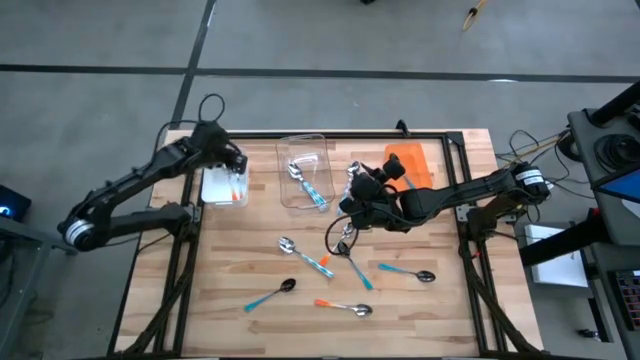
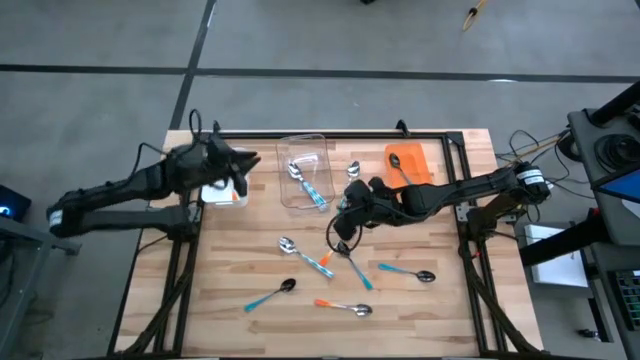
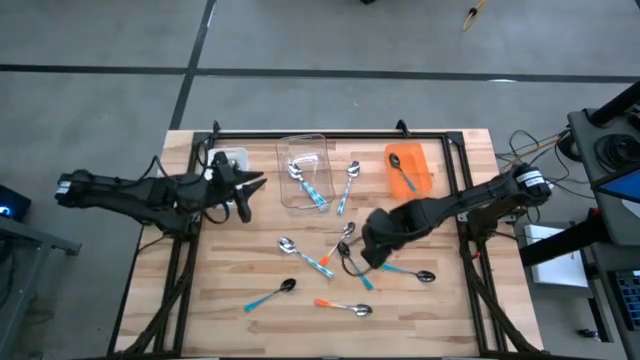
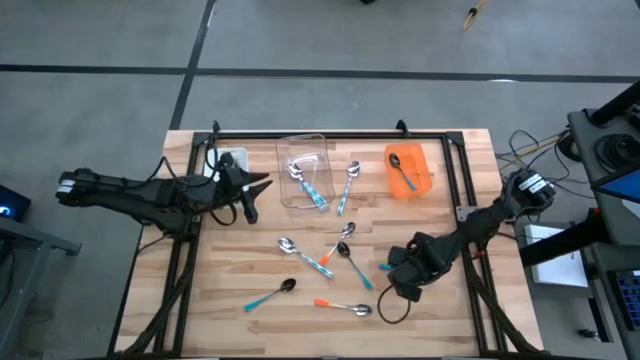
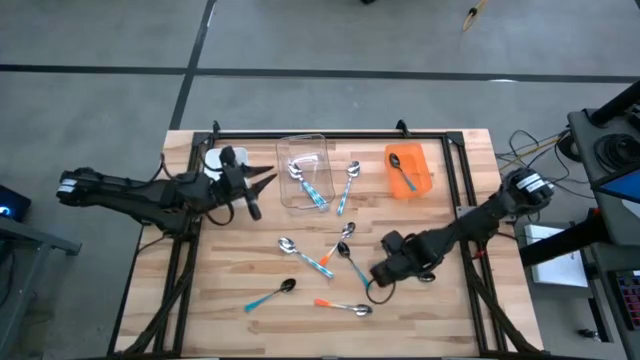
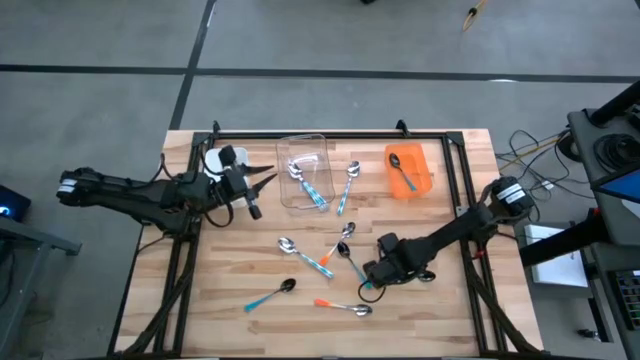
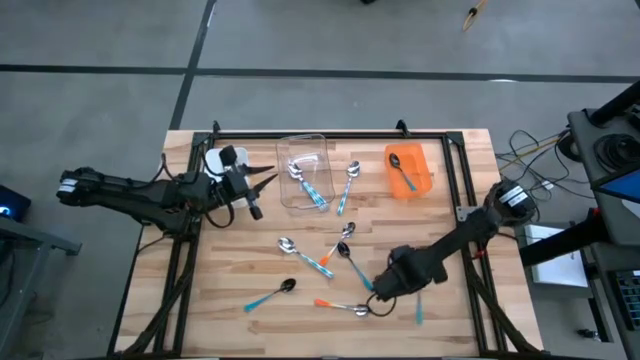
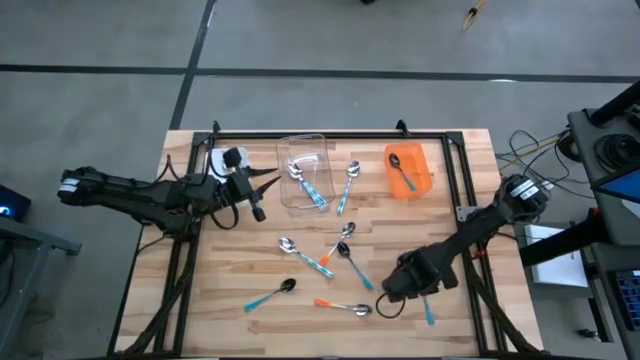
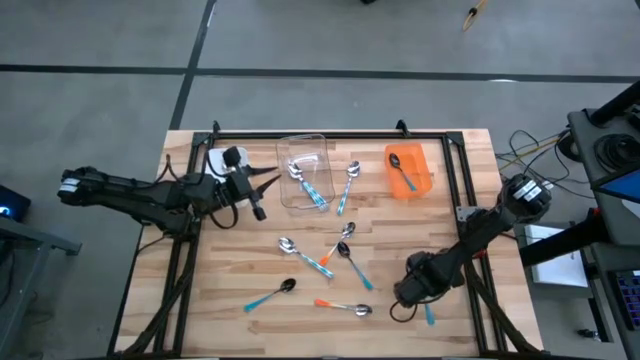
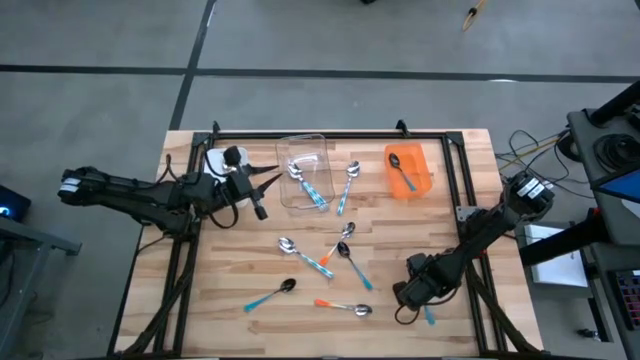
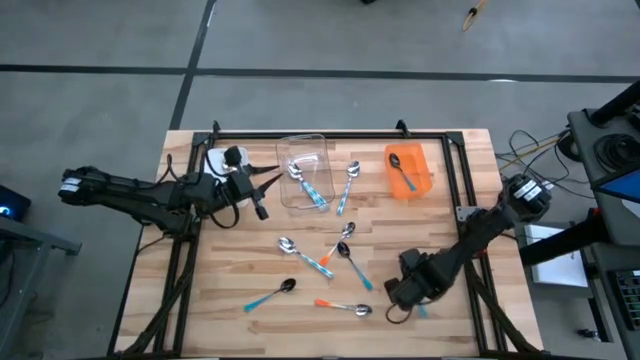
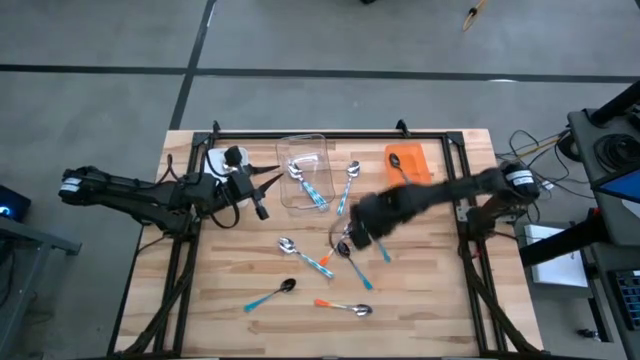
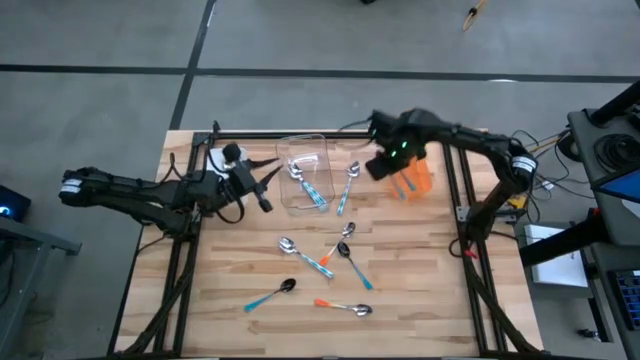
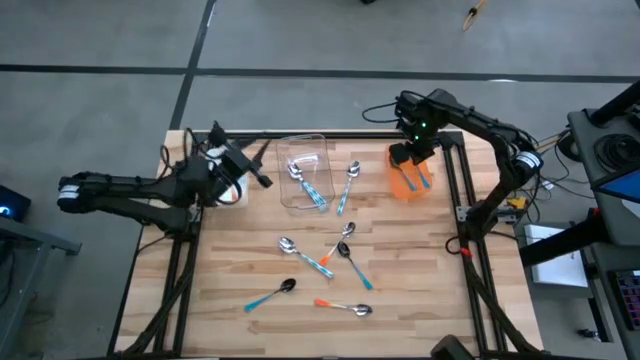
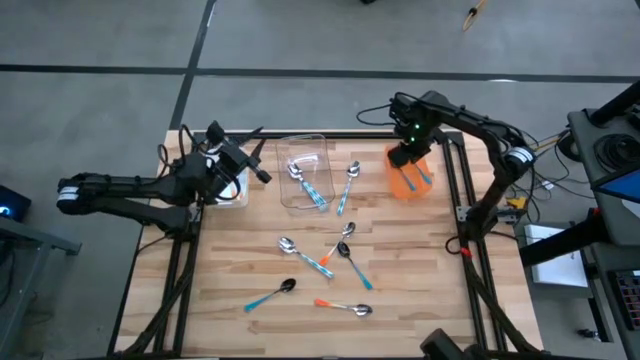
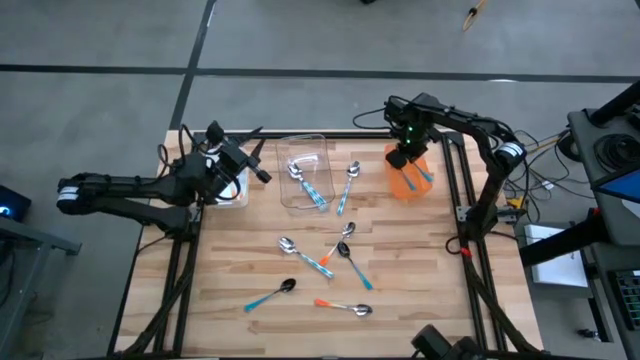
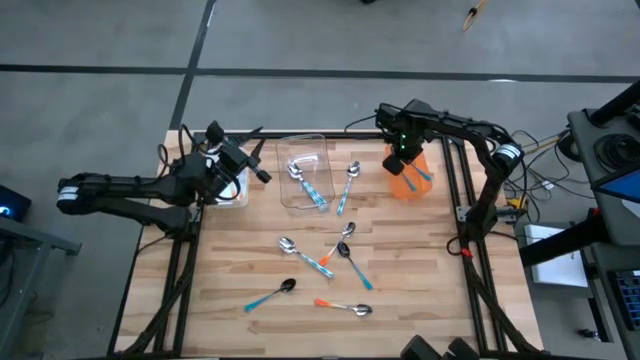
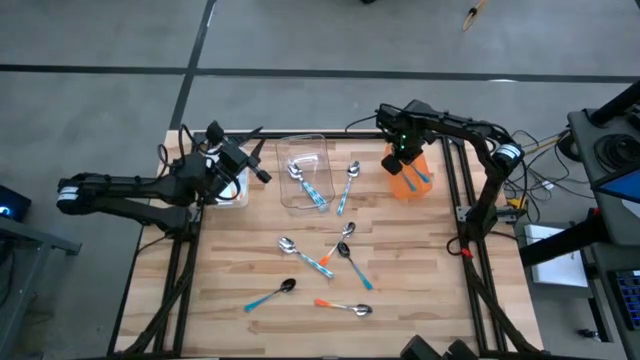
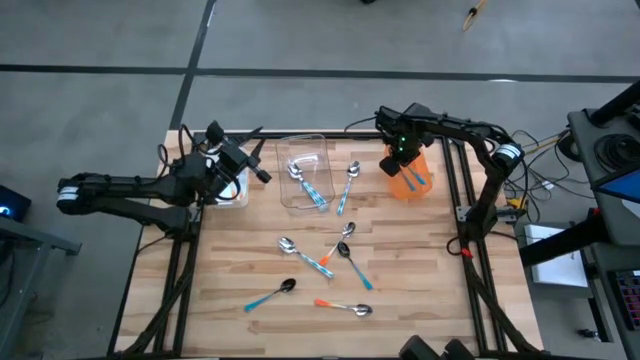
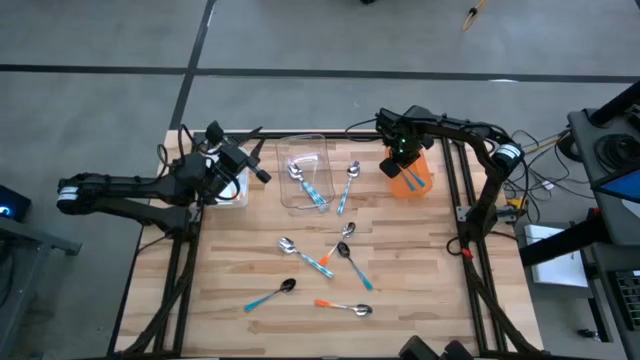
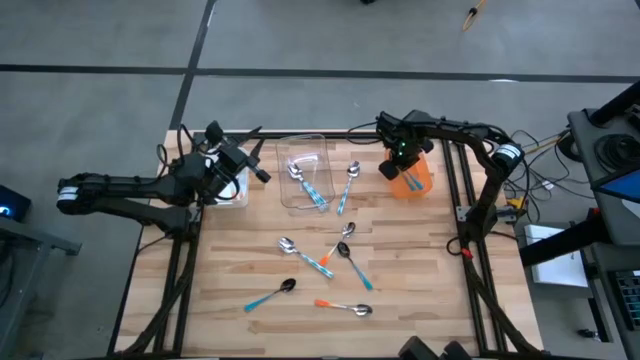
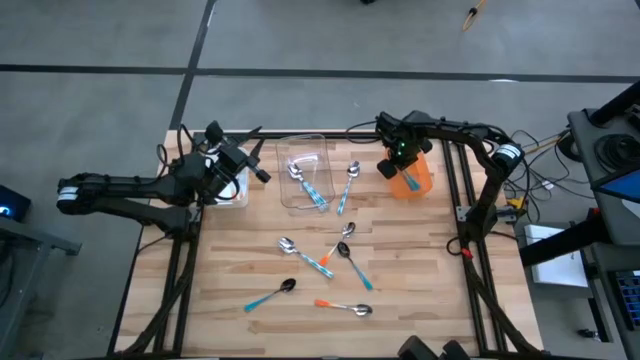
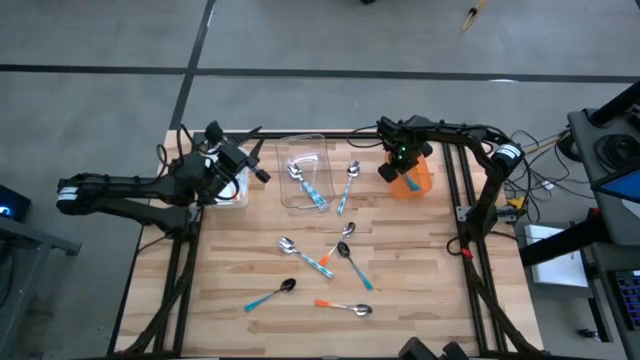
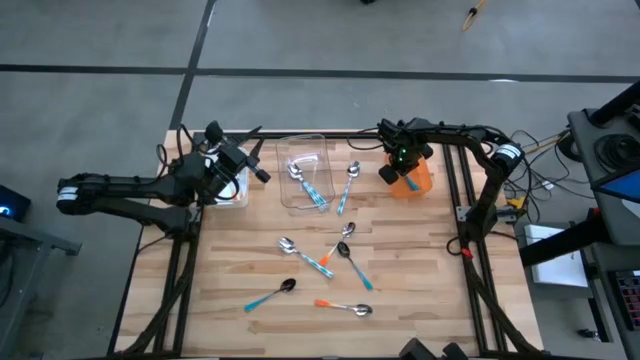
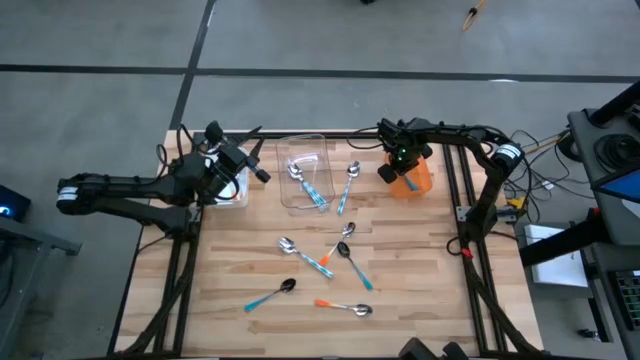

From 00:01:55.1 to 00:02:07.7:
Task: Sort silverware by color (type)
Put the blue spoon into the orange bin

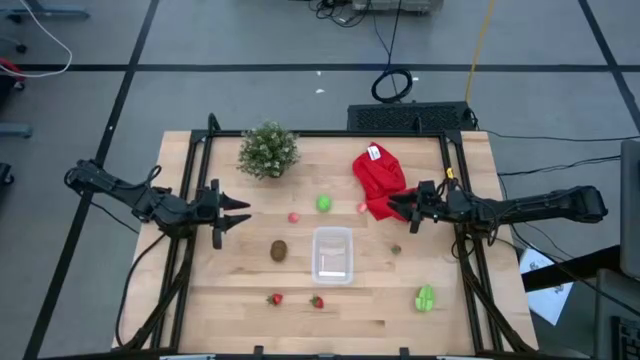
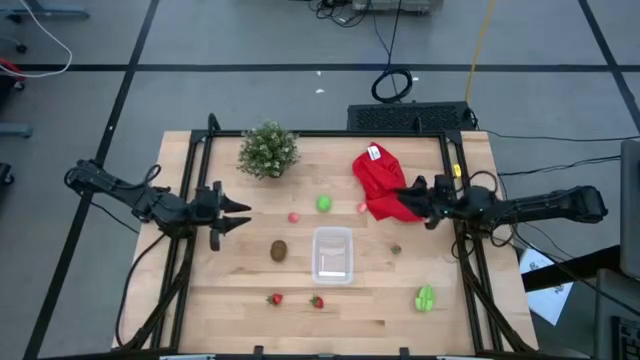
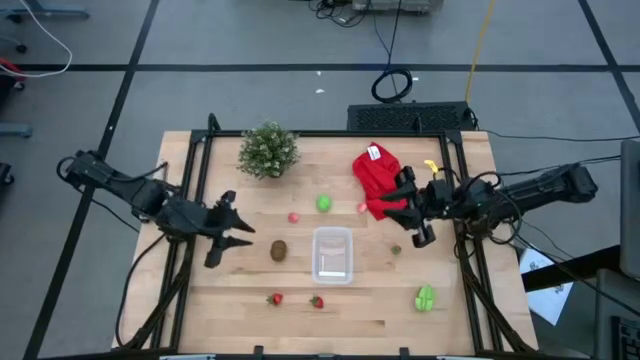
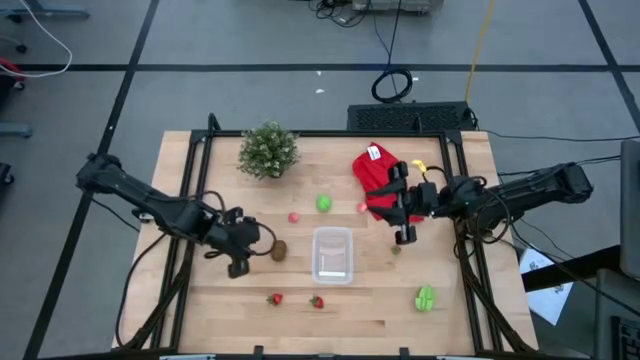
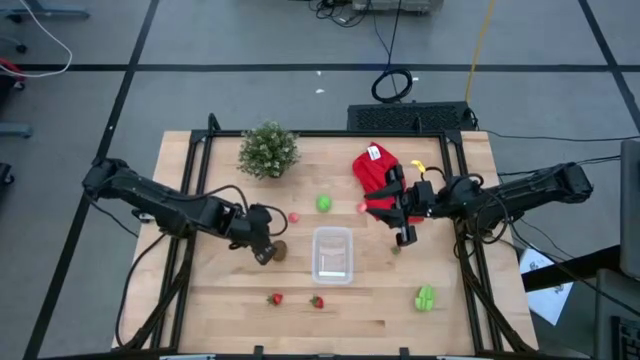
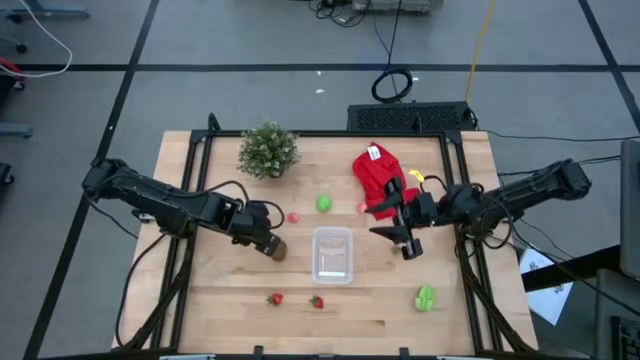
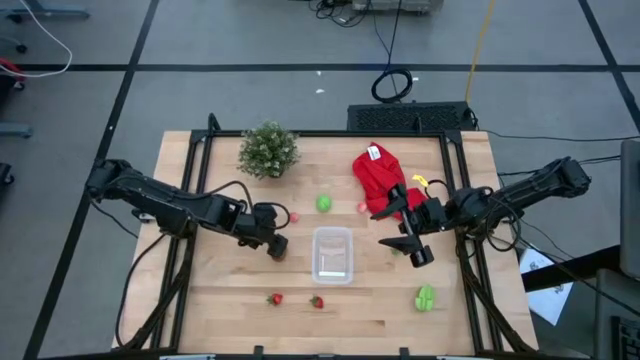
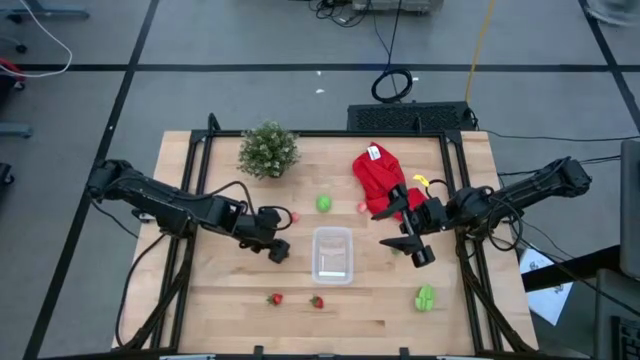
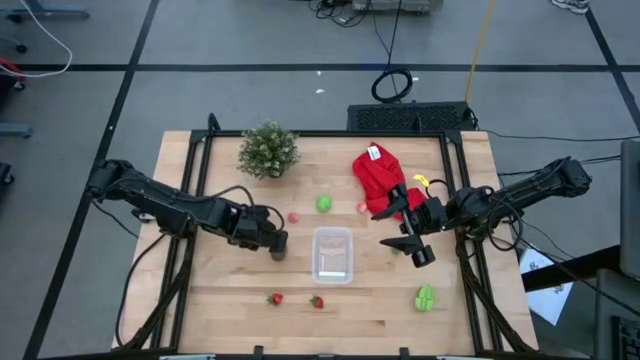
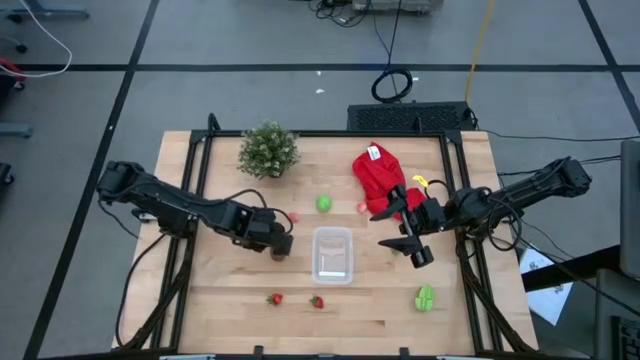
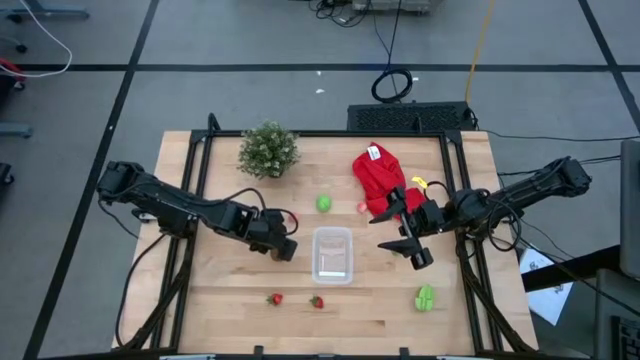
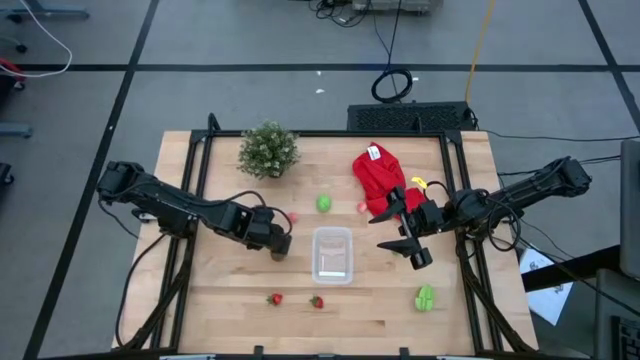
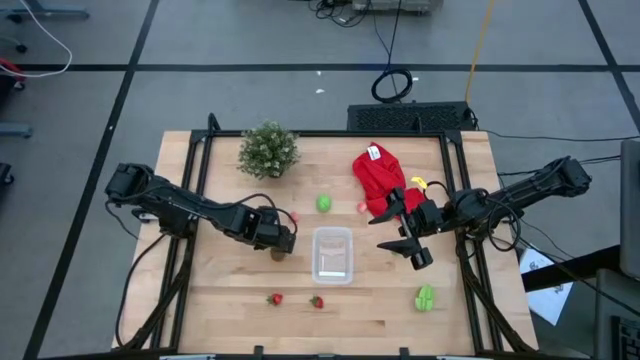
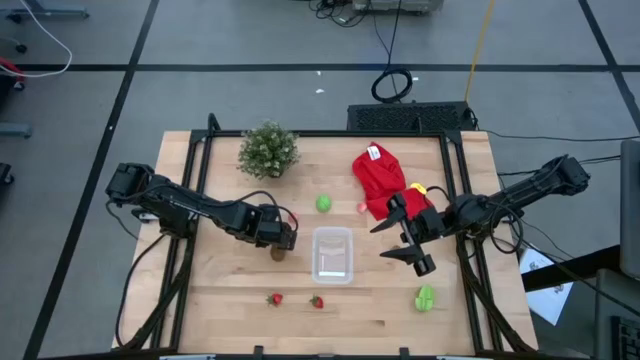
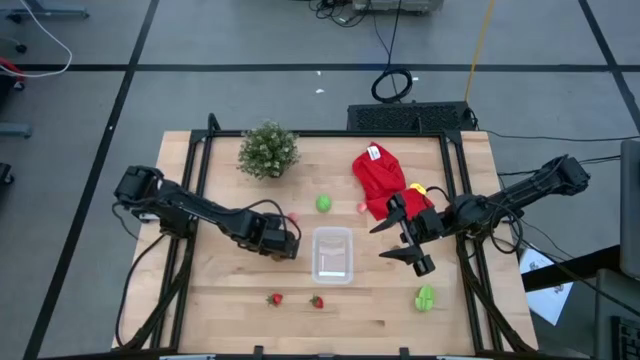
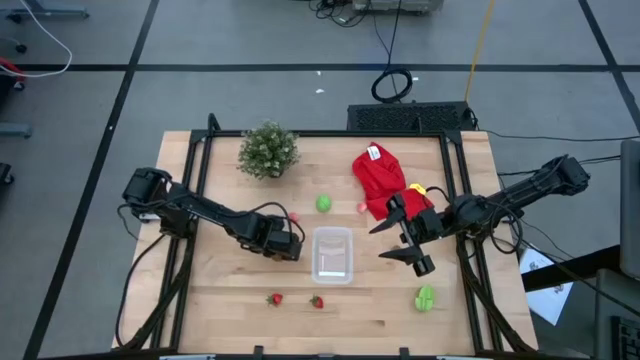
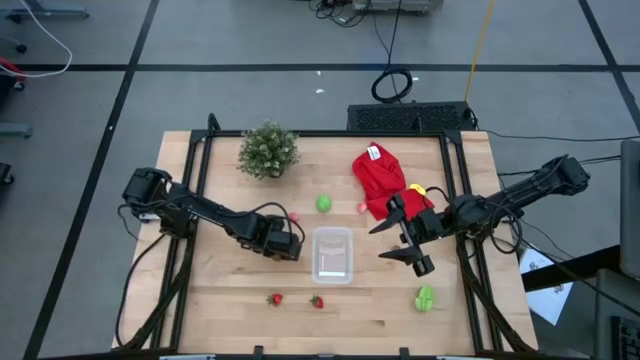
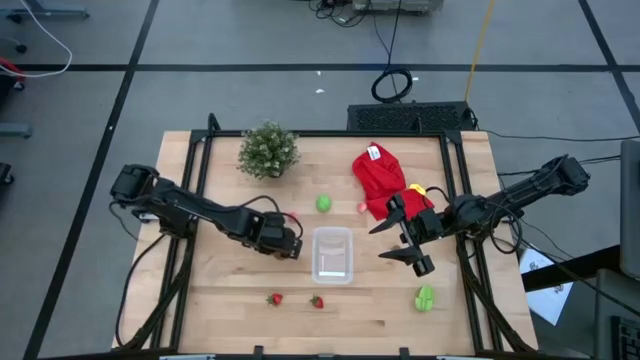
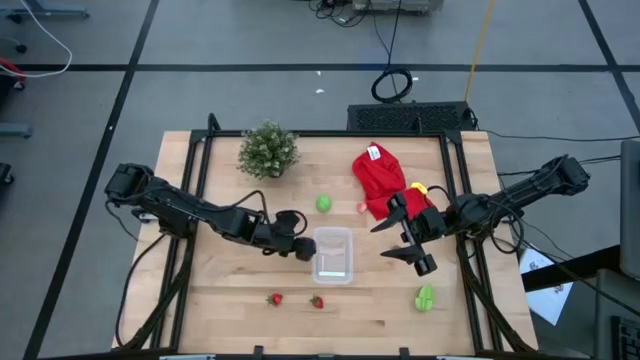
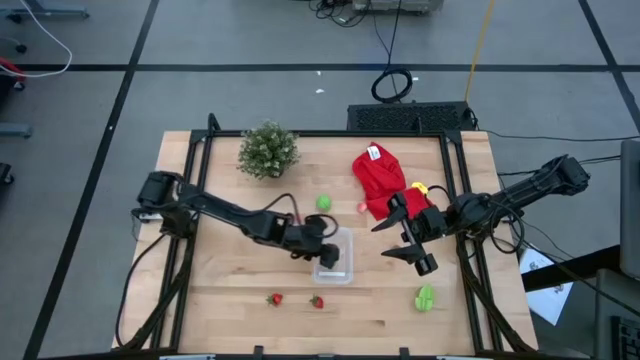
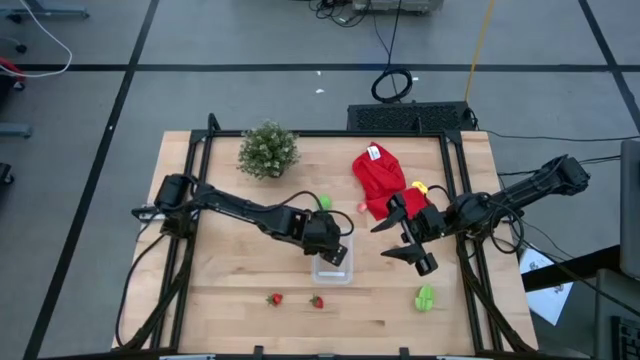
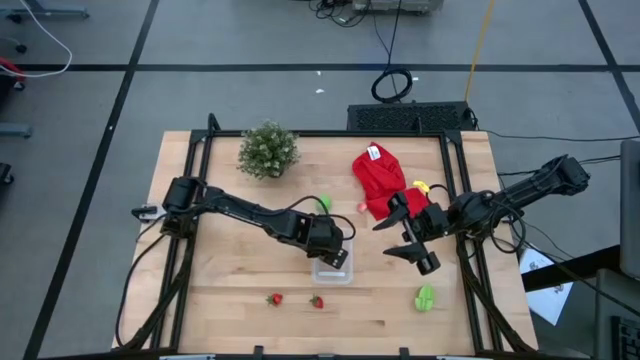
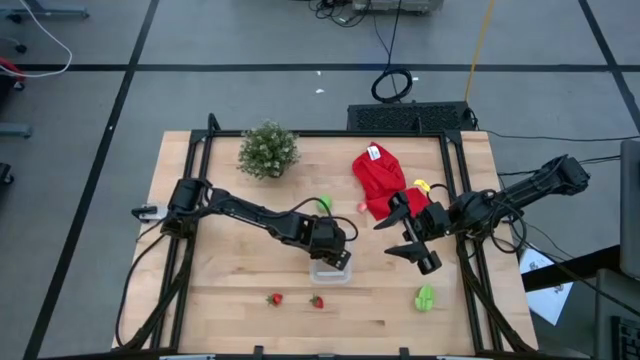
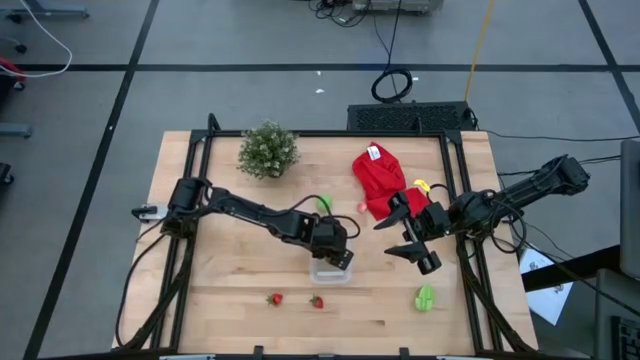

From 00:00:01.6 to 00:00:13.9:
Task: Pick and placing Produce into tupperware
Put the brown kiwi into the transparent bin
